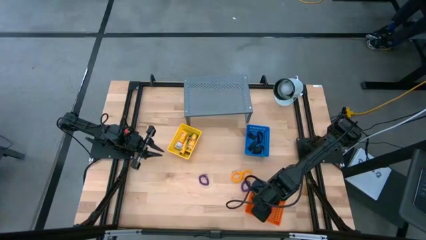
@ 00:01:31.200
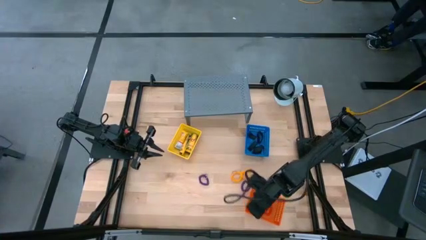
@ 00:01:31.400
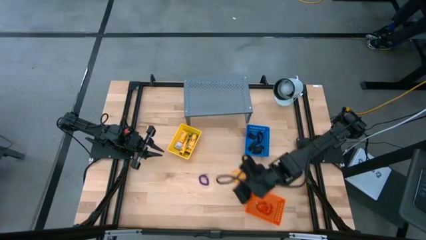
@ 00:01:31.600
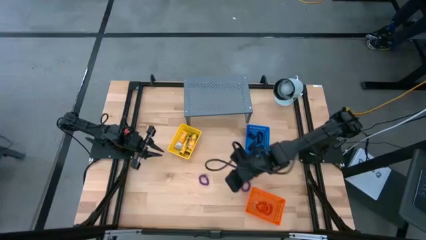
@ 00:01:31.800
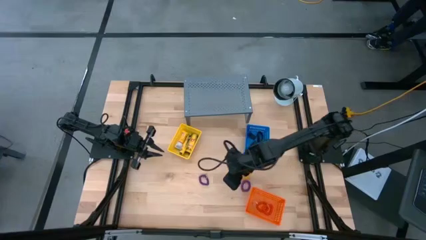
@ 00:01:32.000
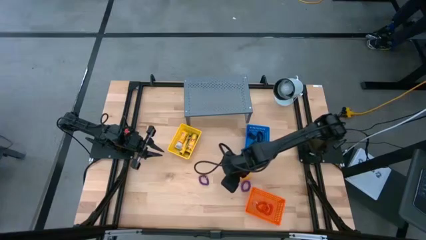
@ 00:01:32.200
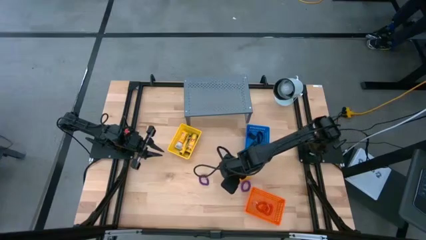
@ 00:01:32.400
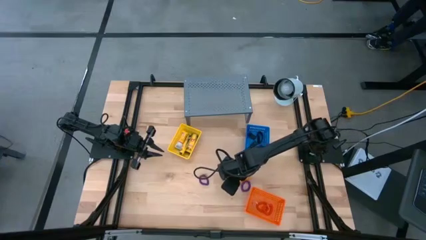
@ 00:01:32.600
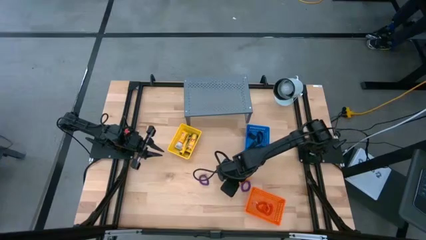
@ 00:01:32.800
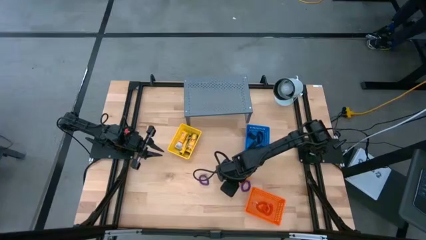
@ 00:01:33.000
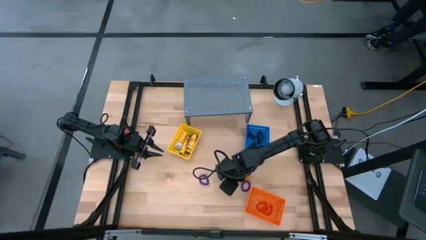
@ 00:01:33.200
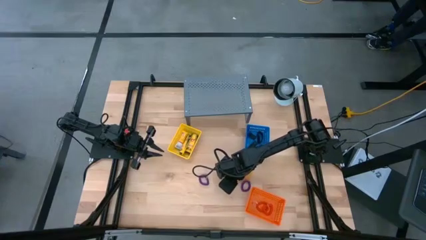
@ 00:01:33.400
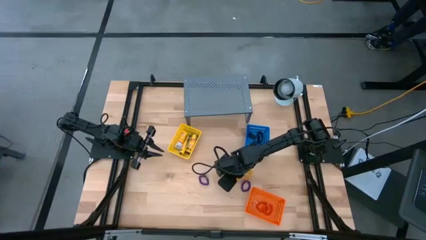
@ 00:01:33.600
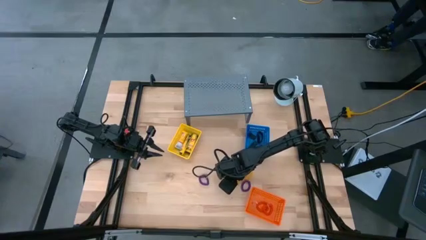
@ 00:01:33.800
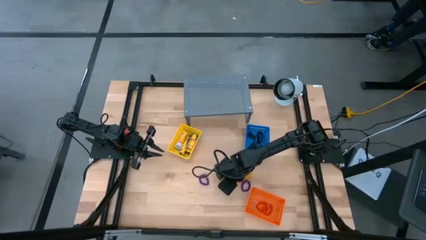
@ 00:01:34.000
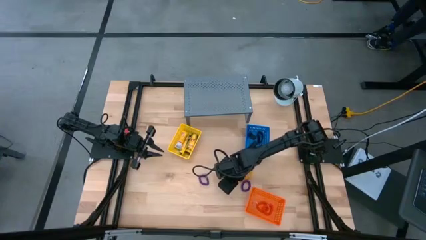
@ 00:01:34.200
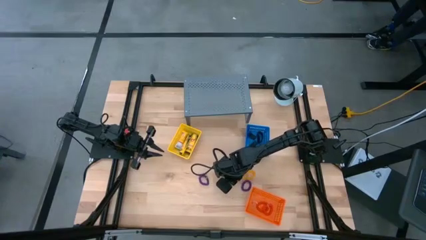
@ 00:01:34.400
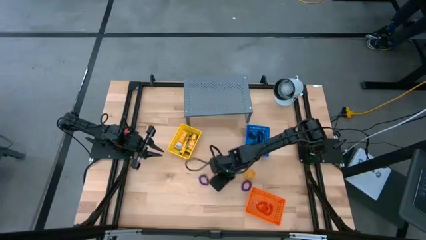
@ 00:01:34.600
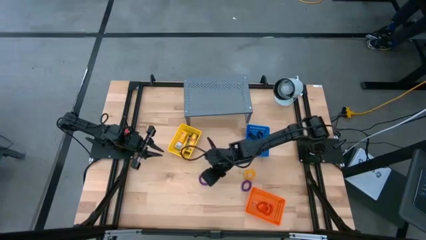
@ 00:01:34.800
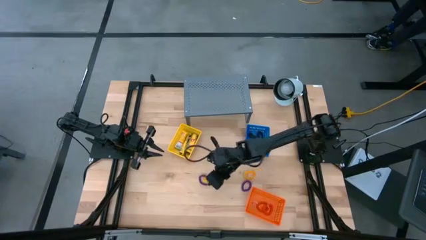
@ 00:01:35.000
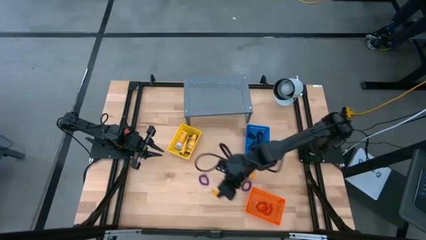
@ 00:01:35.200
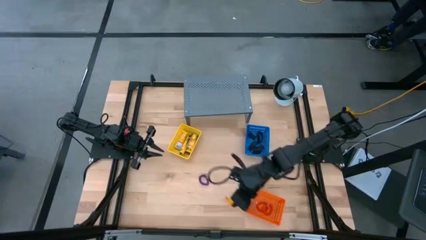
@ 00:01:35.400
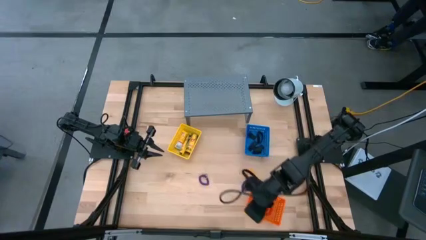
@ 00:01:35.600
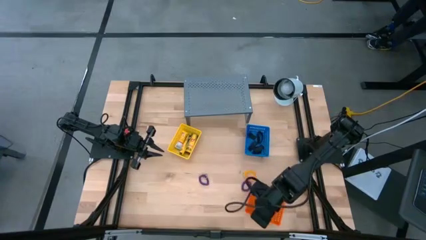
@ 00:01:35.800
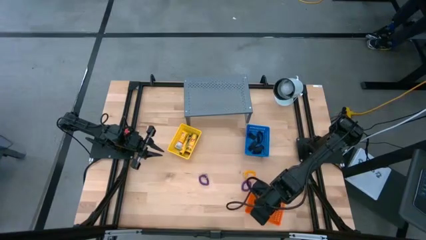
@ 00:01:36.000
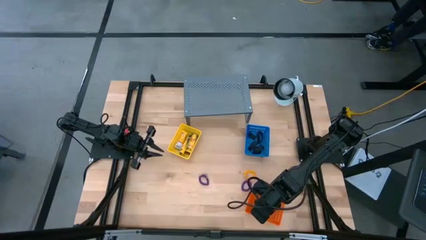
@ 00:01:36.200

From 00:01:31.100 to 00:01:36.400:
Task: Pick & Place Office Desk Supplies
Put the yellow spring keychain into the orange bin

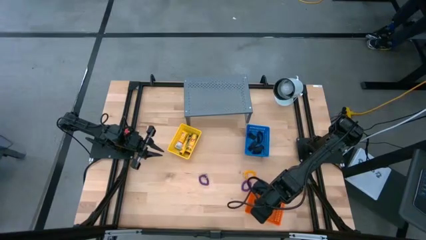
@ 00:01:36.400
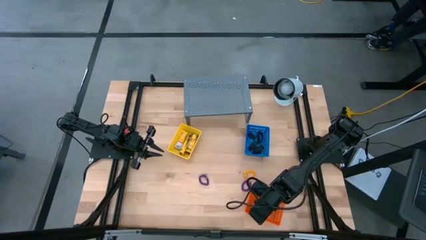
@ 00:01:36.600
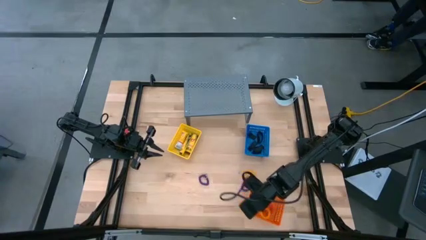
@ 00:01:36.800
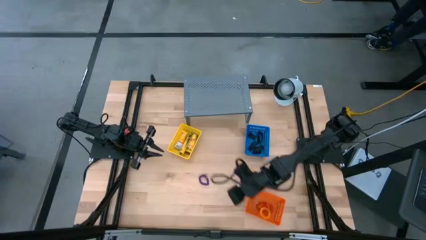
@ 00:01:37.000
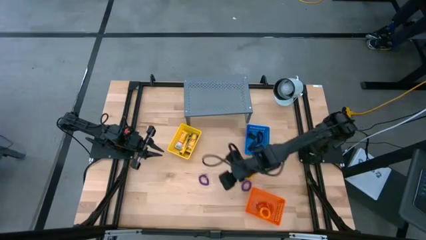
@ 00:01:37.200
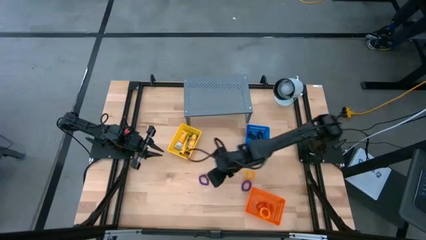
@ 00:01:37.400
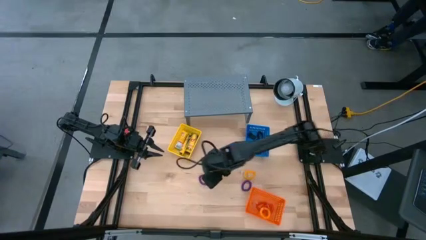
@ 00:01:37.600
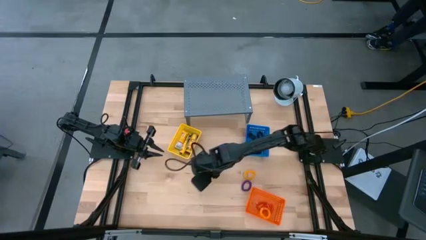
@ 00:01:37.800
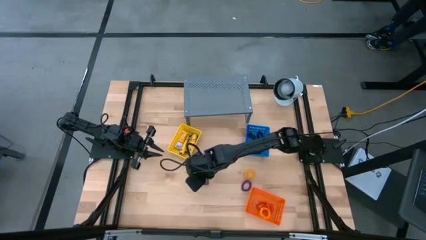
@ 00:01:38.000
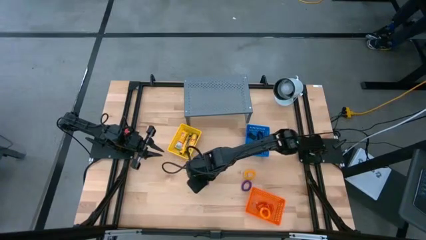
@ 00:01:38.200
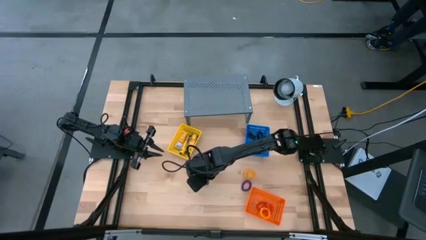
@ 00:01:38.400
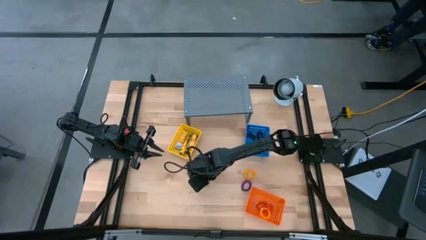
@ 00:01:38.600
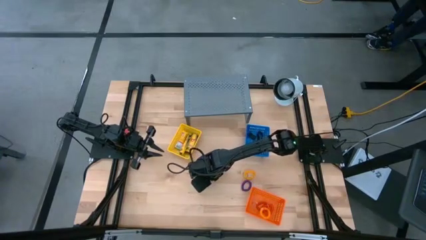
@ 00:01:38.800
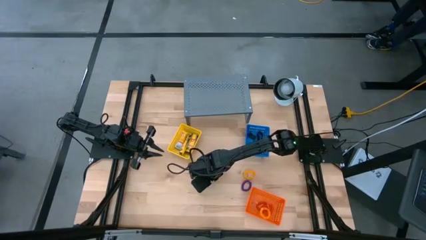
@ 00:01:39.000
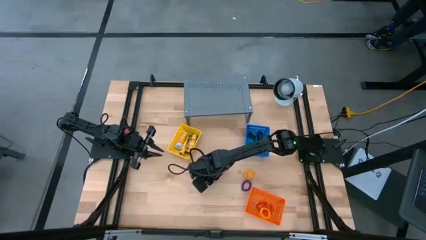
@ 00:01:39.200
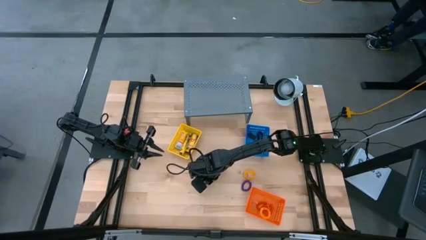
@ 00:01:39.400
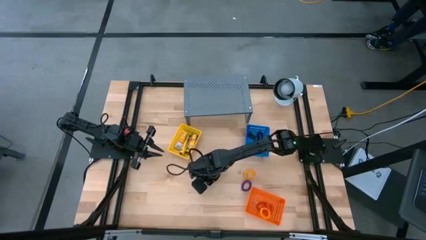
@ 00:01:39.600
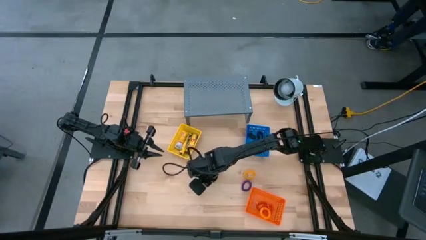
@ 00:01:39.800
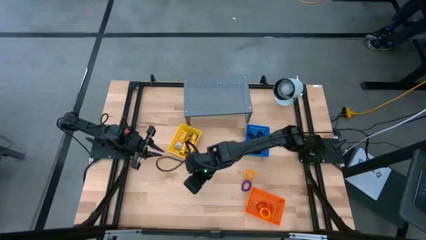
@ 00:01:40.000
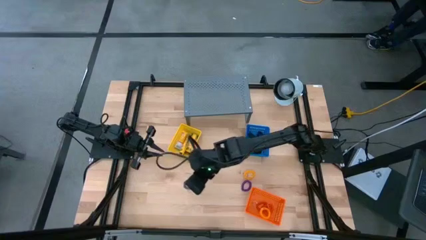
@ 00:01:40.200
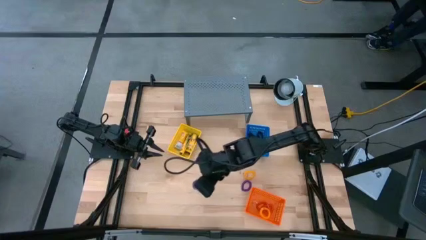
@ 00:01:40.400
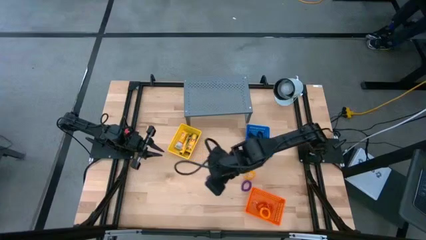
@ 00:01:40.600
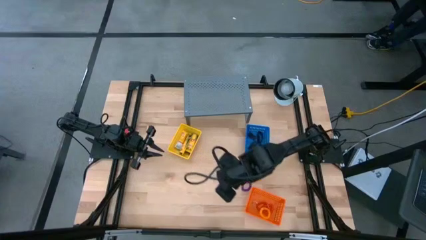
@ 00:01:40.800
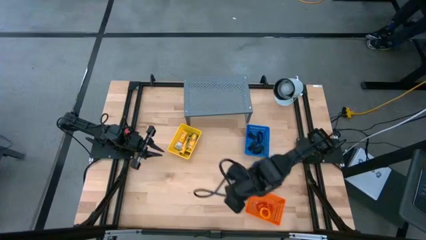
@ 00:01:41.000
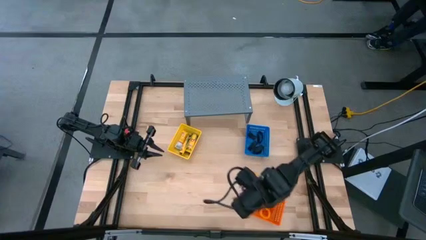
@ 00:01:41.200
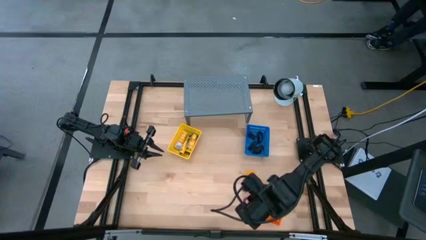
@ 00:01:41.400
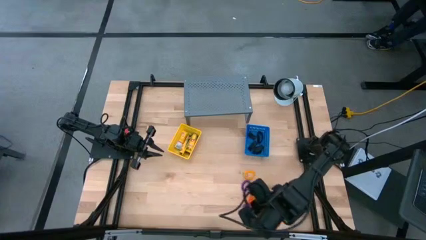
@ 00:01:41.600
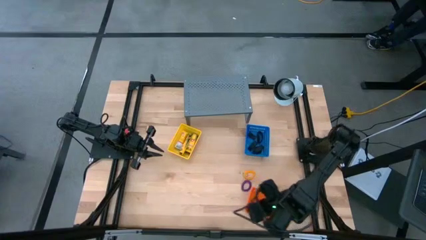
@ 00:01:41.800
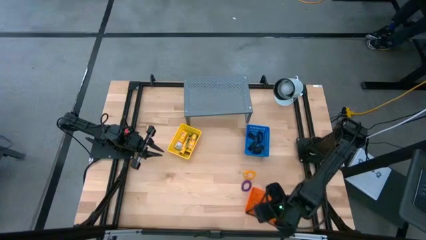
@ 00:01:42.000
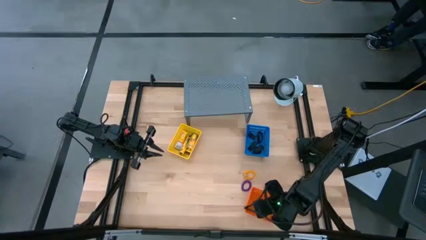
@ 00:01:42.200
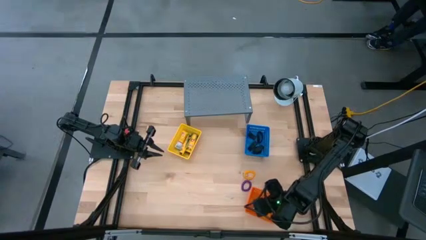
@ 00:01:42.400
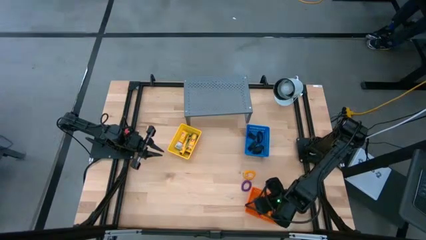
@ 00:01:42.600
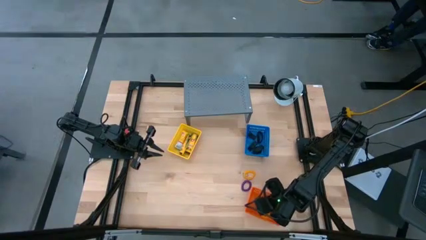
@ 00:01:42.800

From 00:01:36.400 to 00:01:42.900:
Put the purple spring keychain into the orange bin

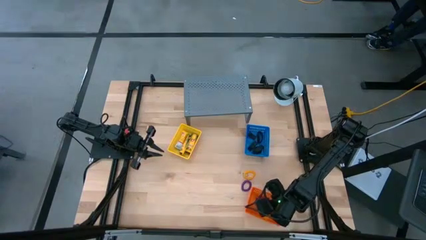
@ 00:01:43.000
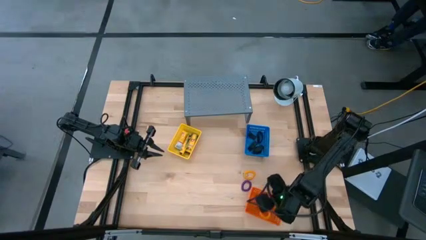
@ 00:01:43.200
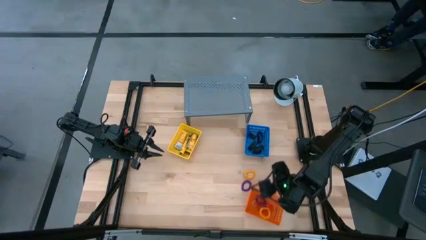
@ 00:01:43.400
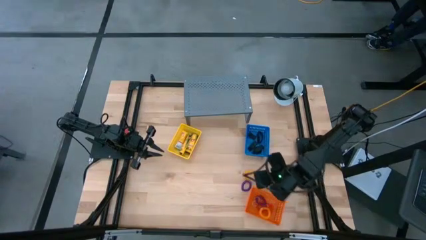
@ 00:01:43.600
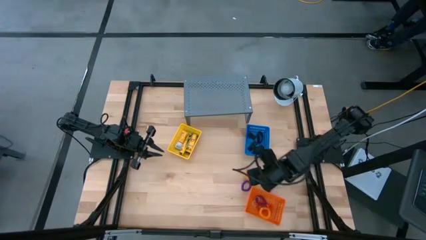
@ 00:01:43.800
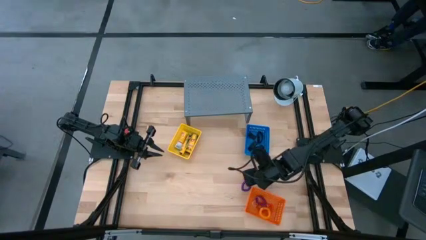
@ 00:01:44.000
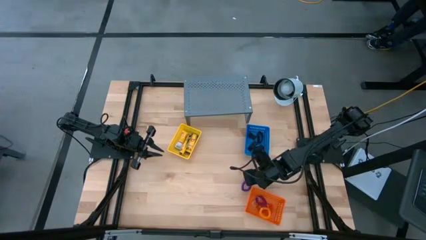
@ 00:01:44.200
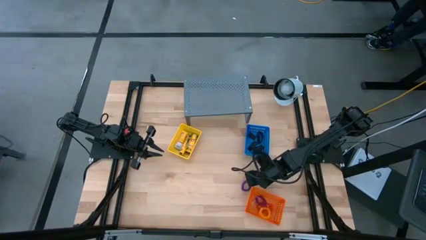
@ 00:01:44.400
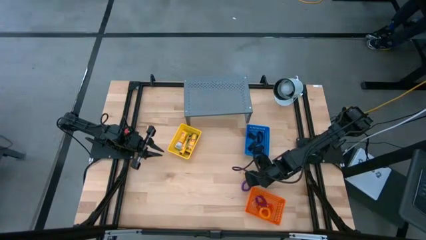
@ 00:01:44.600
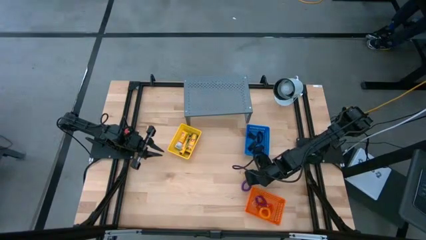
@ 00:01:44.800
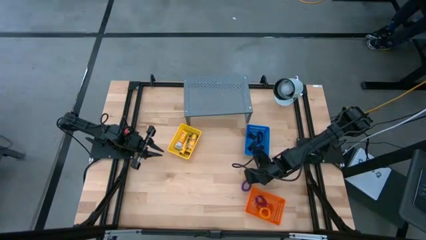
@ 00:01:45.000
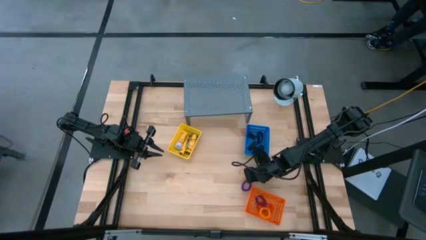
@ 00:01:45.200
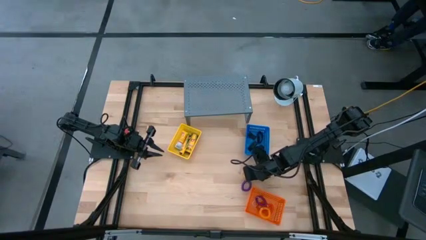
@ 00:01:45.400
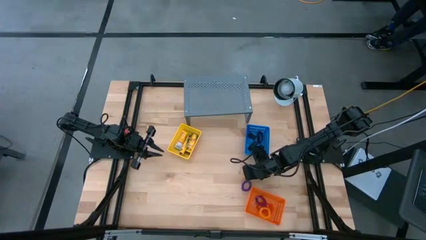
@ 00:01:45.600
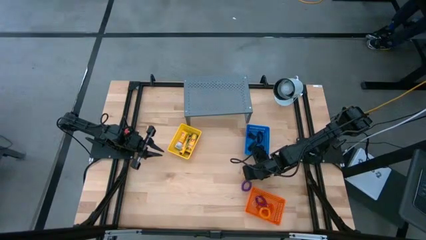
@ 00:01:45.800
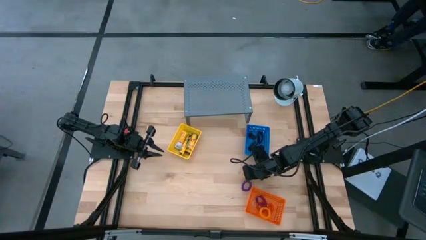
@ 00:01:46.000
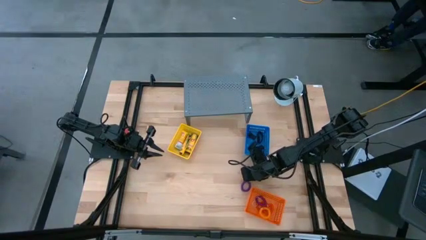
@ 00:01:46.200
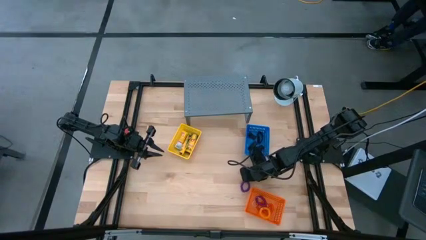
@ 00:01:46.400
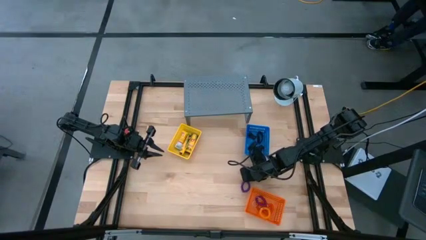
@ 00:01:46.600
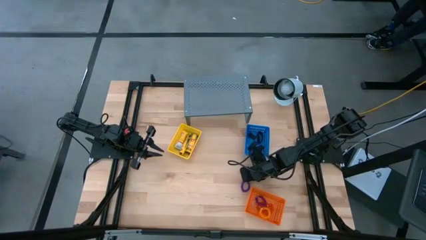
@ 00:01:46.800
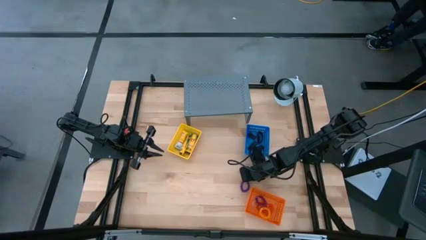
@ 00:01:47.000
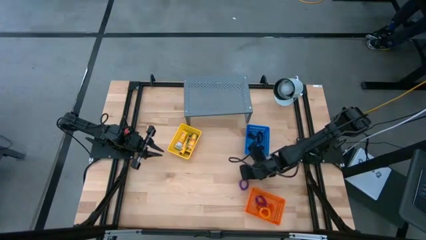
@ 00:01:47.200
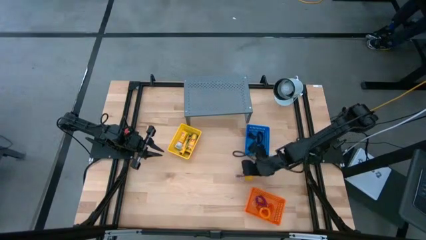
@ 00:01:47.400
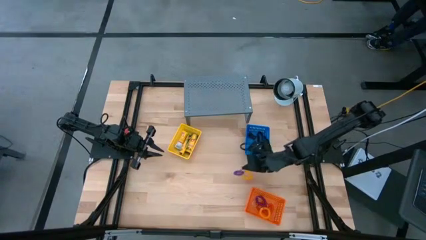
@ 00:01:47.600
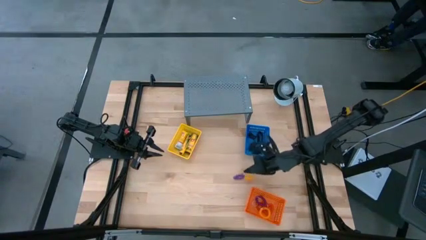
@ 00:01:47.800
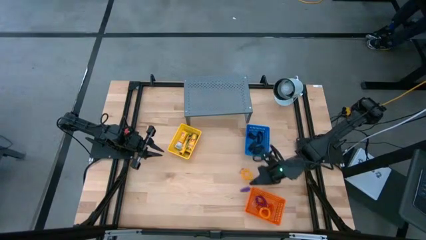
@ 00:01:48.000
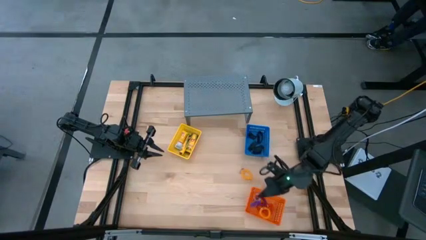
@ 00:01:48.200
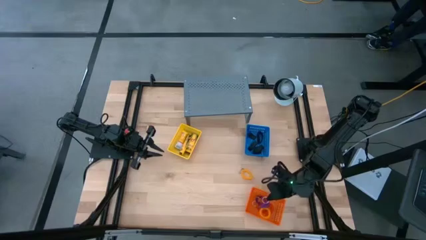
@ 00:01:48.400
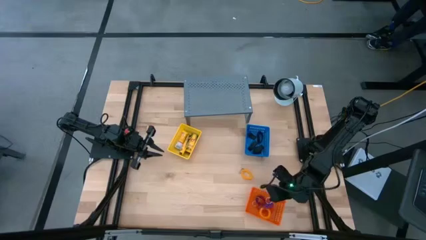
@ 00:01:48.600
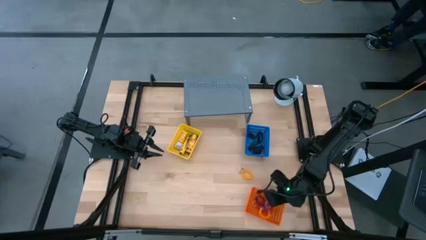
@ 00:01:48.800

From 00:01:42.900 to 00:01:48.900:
Put the purple spring keychain into the orange bin
